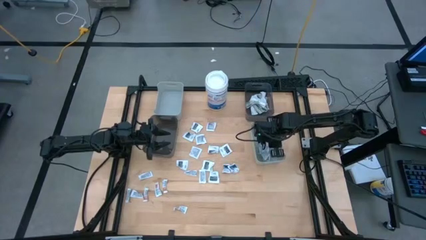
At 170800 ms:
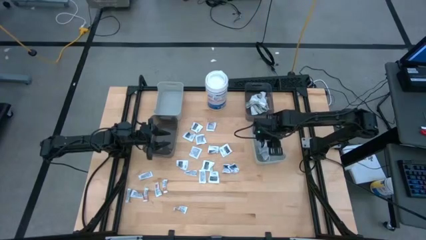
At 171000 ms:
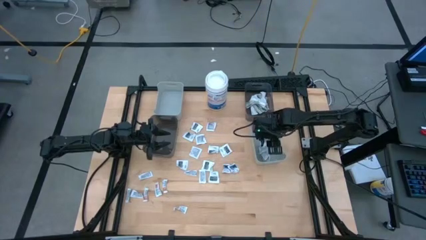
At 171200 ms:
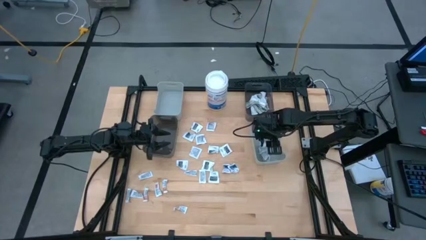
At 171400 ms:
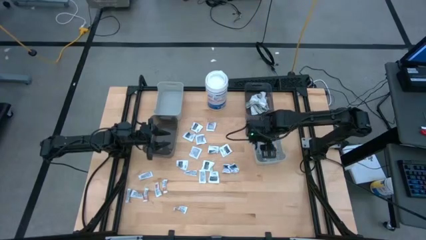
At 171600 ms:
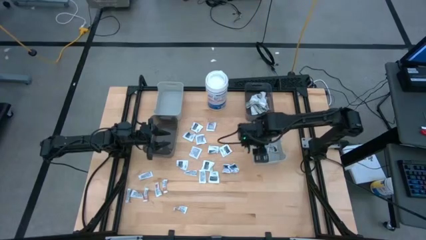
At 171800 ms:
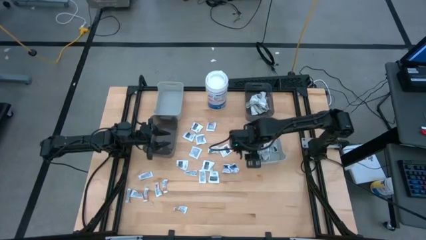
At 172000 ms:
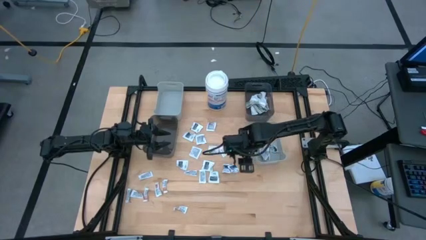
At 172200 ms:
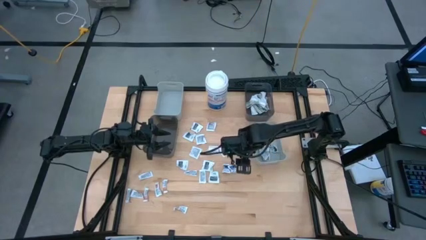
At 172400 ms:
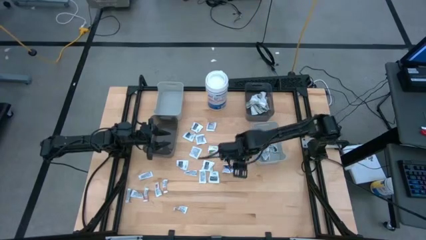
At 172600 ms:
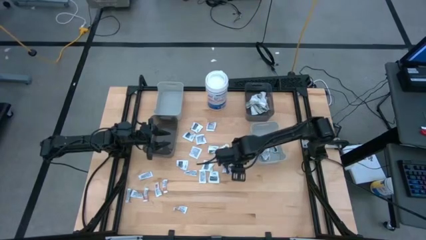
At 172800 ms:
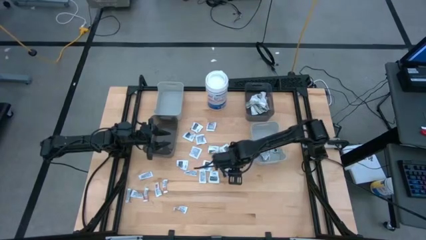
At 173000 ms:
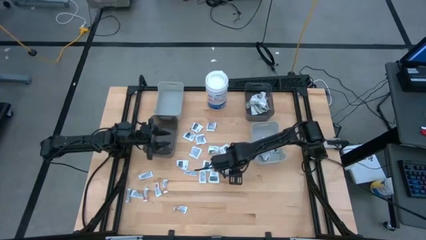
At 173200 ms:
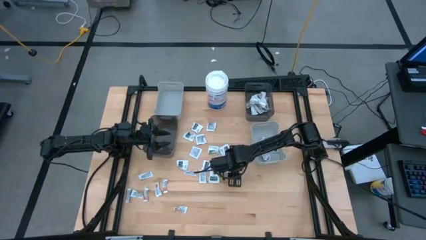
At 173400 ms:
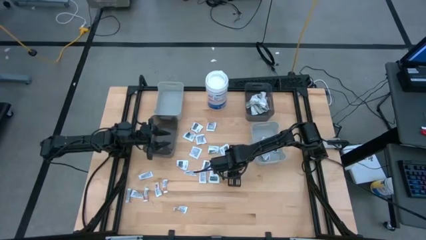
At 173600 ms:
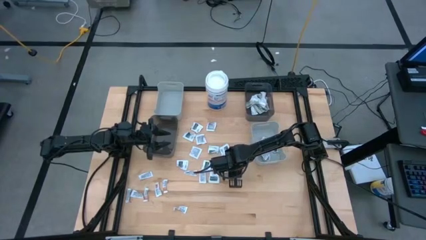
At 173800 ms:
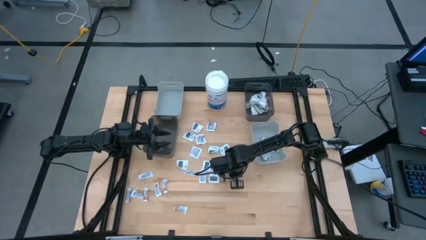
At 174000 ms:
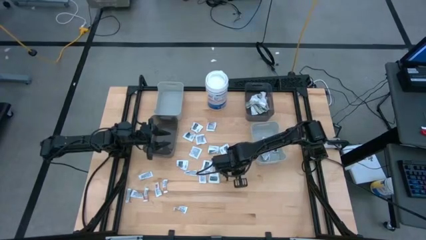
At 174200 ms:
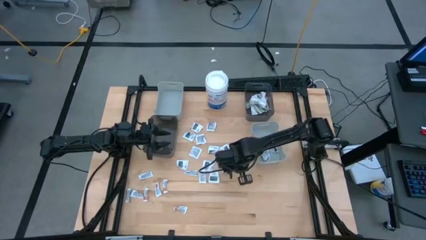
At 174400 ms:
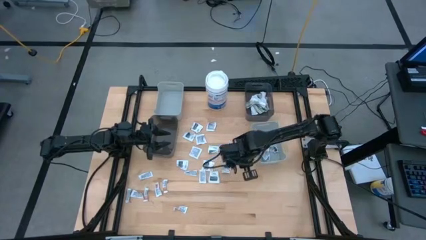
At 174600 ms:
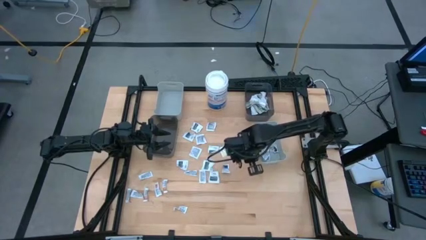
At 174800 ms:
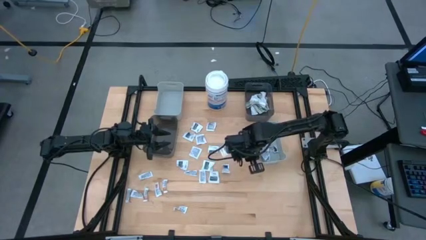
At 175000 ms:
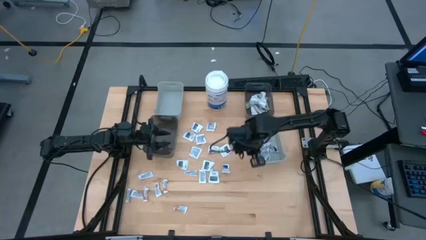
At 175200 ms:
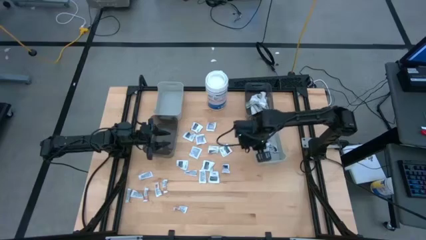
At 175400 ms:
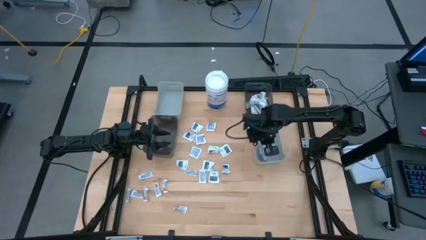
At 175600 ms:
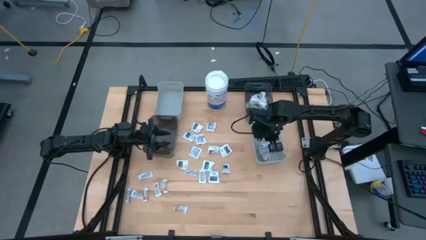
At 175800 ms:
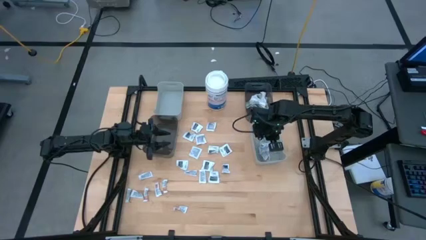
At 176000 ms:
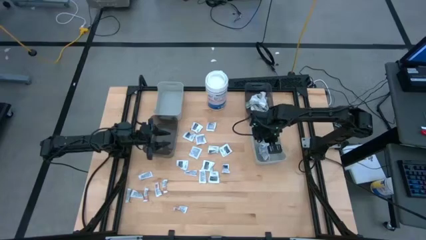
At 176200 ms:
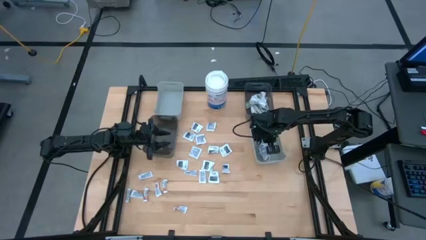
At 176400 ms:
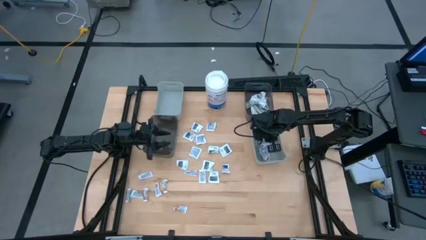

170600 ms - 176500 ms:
Task: Pick & Place First Aid Supplies
Put the blue alcohol pad into the right gray bin

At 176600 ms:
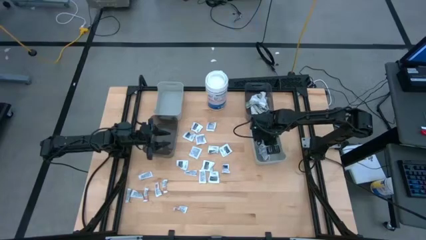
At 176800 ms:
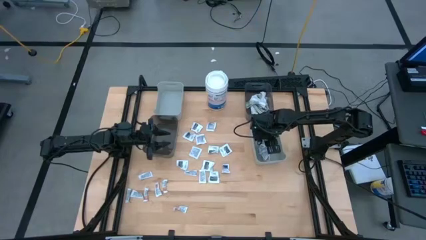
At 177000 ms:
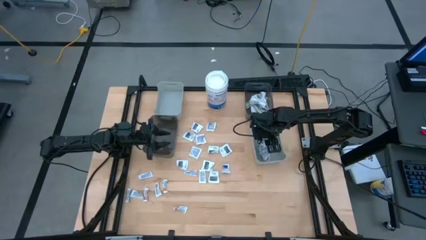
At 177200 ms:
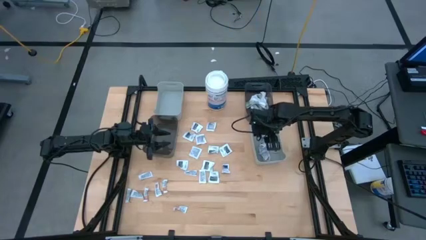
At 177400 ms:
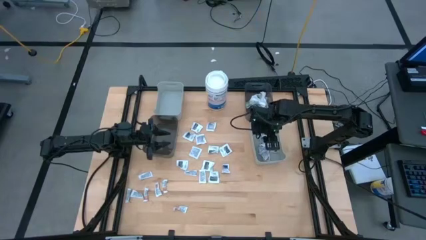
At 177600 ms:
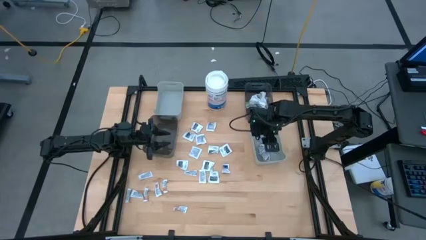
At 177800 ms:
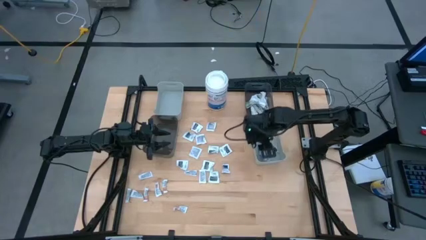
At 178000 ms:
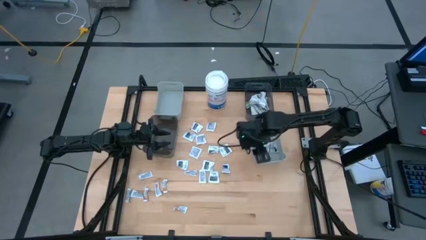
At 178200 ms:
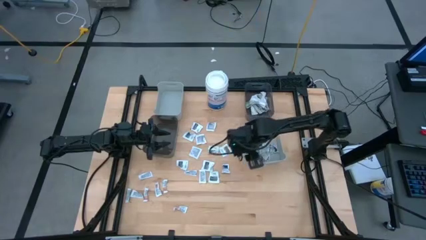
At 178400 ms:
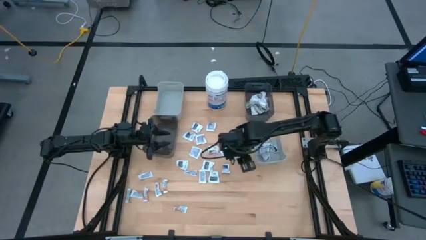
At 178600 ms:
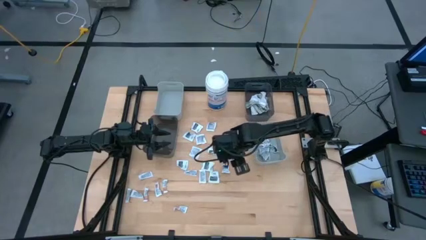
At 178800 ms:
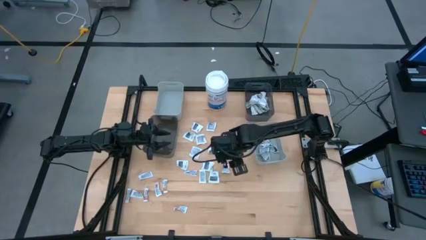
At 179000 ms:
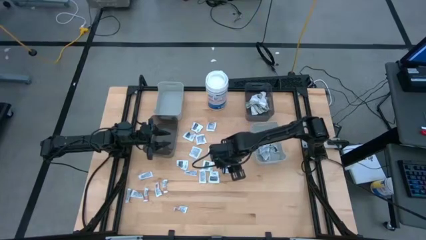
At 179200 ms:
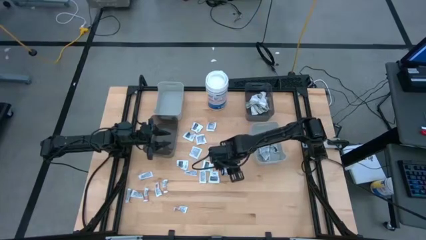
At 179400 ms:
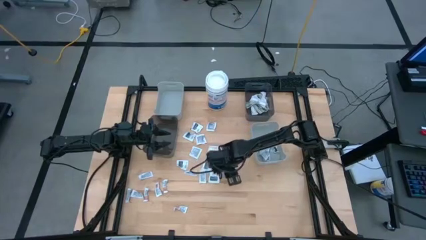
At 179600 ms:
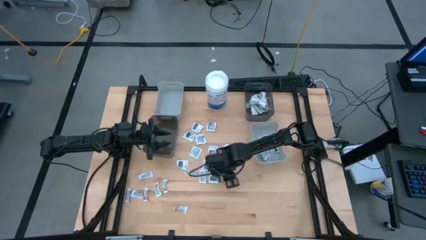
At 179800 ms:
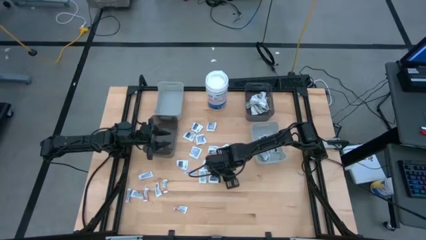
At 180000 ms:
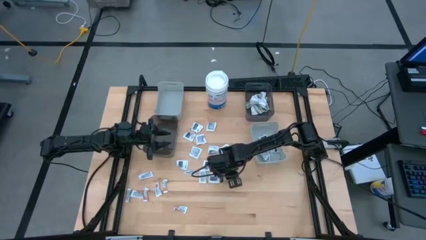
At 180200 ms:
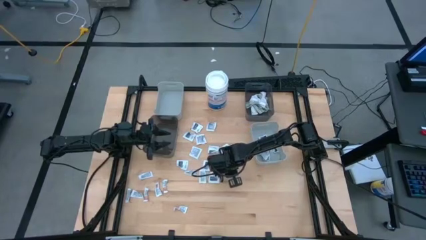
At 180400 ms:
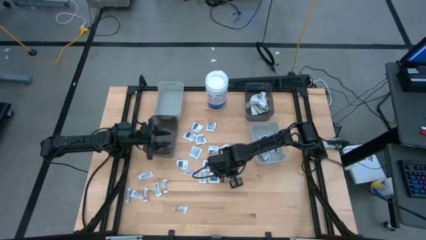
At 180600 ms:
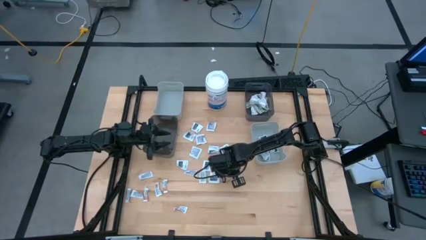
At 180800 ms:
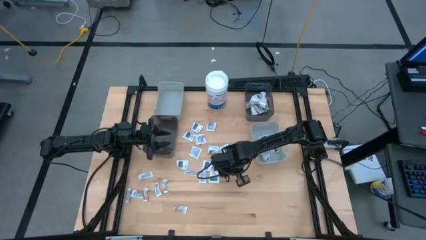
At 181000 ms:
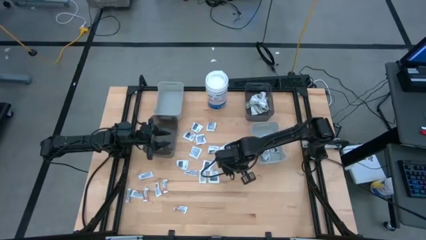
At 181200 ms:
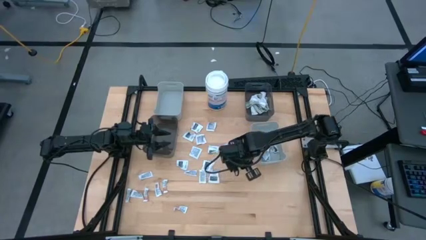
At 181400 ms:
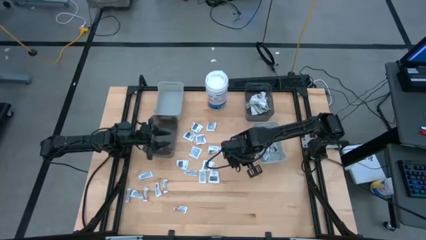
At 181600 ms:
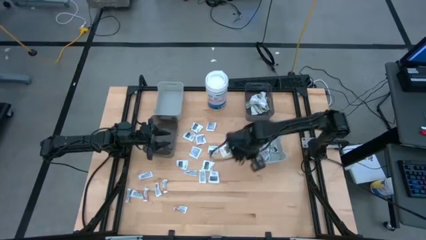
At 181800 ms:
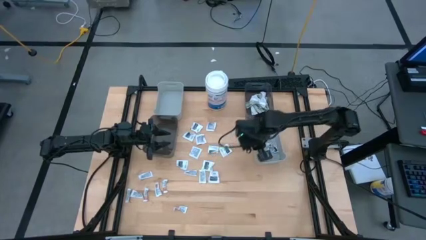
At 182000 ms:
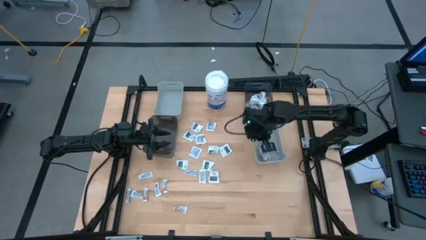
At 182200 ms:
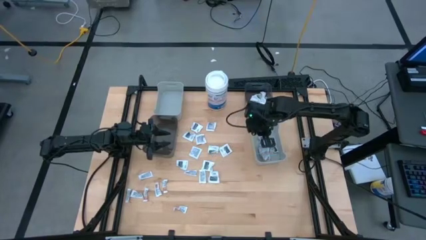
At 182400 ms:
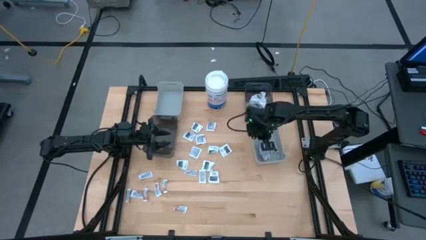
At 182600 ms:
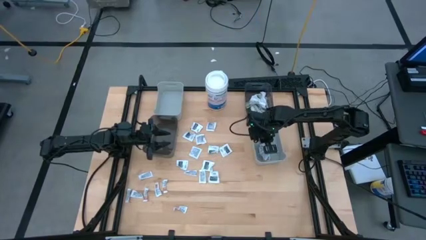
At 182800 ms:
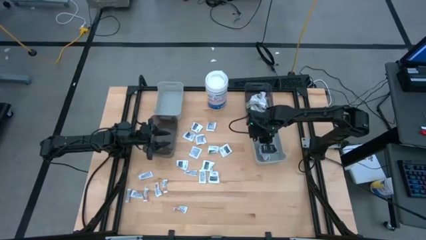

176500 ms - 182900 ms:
Put the blue alcohol pad into the right gray bin

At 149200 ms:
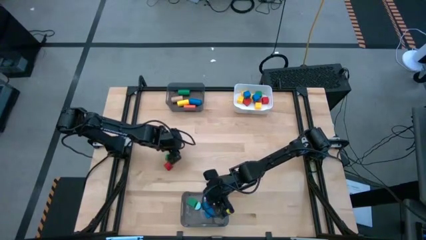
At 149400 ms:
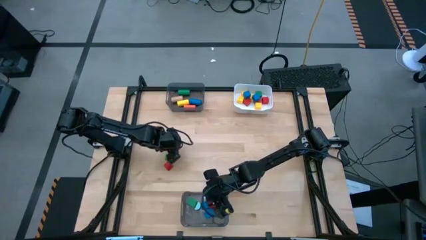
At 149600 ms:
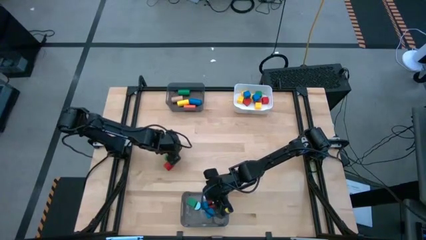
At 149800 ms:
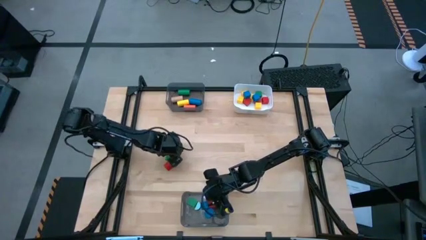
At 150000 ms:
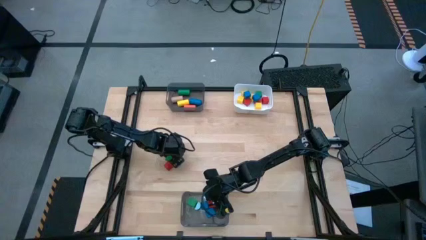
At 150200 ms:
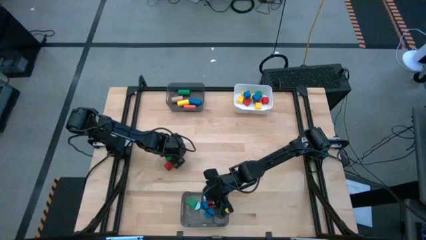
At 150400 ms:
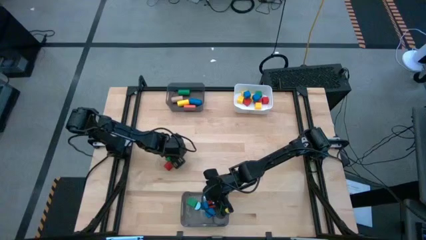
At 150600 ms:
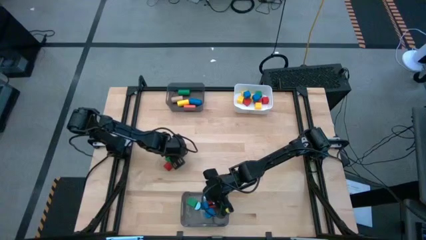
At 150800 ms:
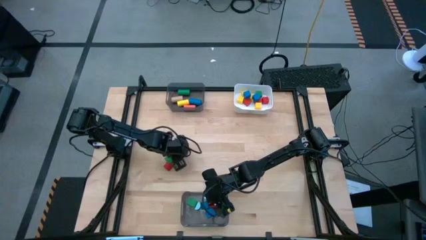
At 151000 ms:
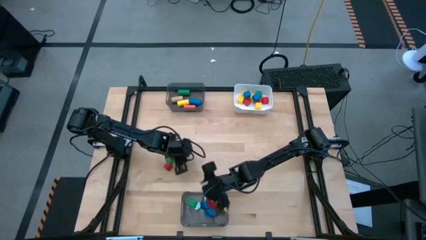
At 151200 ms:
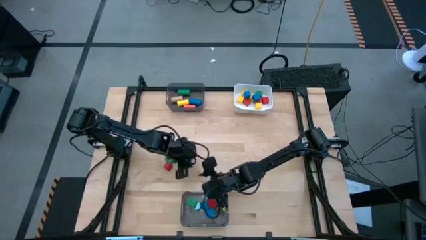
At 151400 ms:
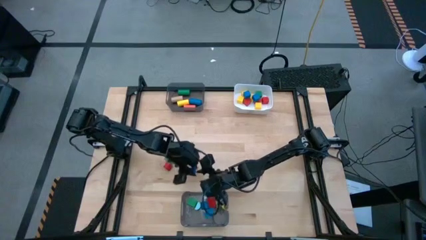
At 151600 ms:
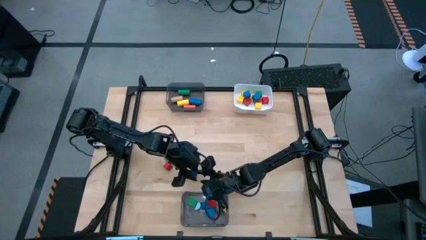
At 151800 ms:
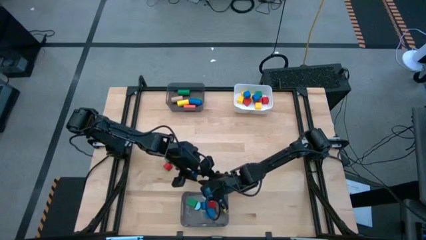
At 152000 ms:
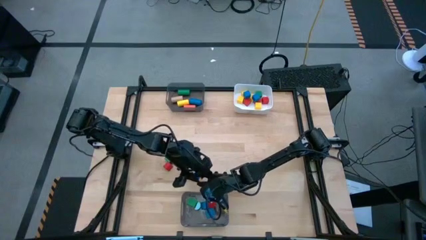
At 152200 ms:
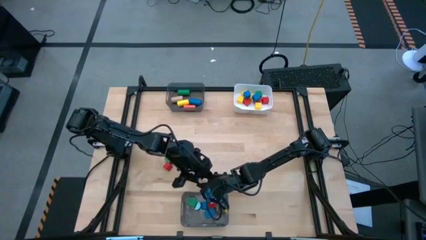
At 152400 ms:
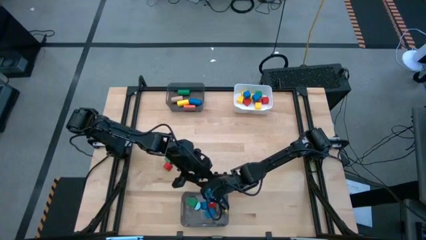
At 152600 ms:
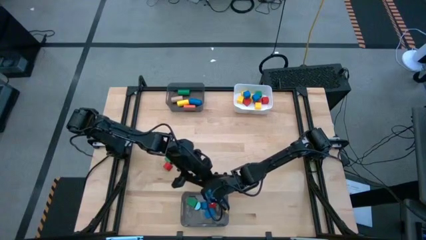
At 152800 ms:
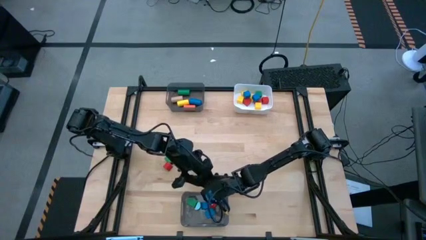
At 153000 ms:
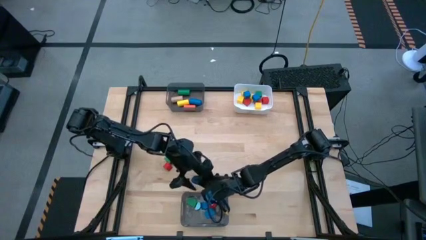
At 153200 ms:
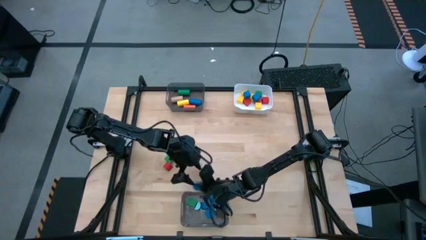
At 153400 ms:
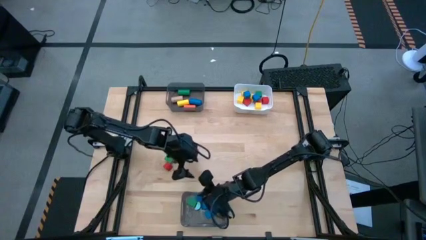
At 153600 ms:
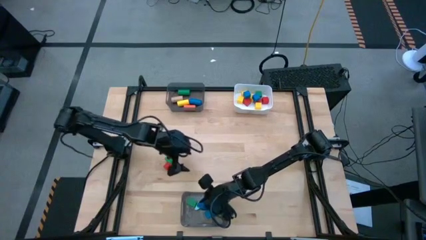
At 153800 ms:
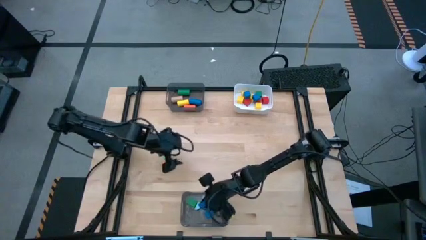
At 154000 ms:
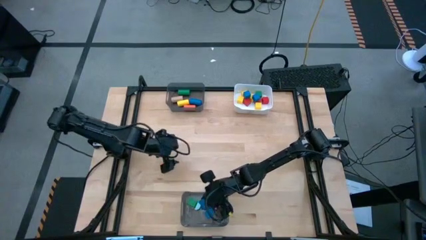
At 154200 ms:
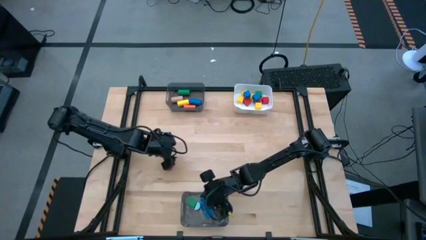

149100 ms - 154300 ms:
Task: Sort blocks by size
Put the blue half circle block into the bottom black bin
